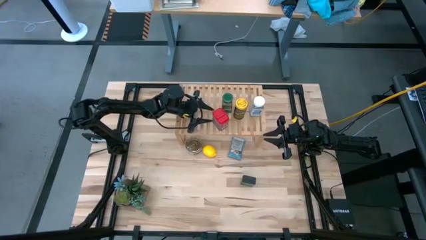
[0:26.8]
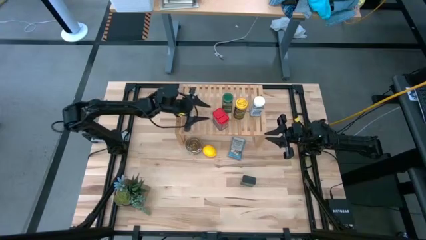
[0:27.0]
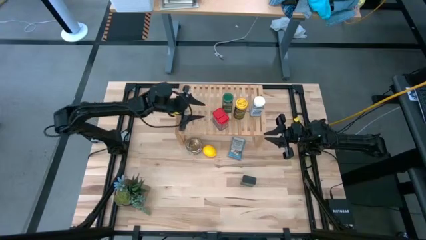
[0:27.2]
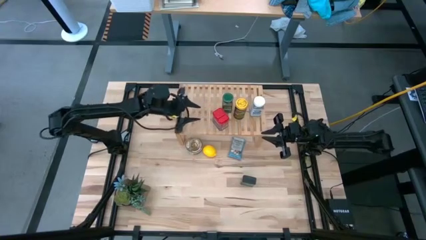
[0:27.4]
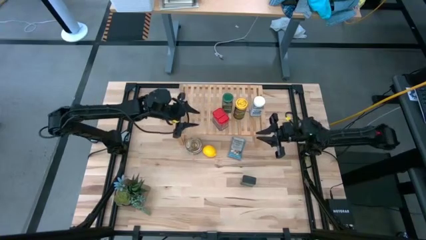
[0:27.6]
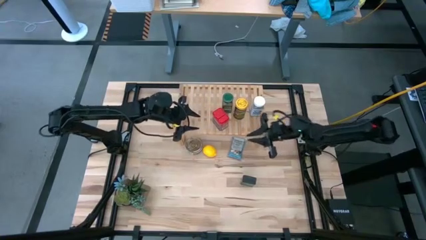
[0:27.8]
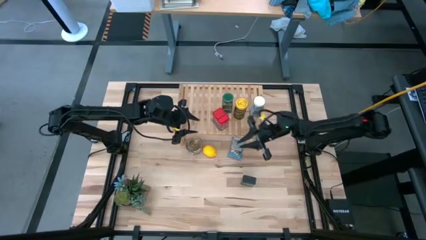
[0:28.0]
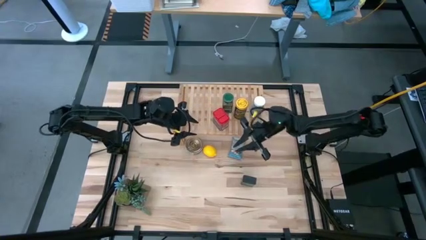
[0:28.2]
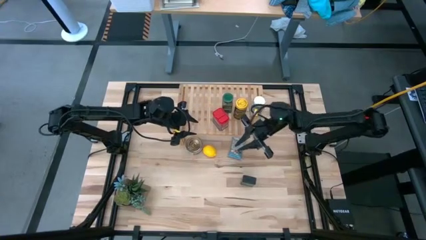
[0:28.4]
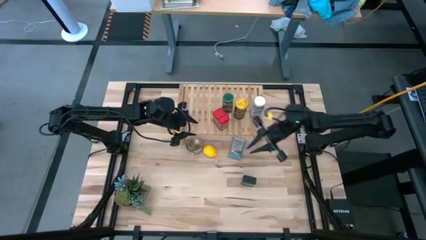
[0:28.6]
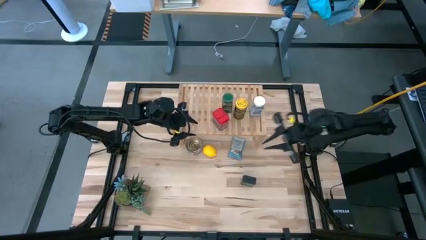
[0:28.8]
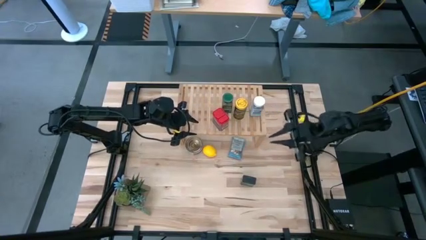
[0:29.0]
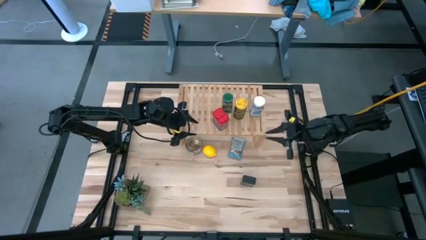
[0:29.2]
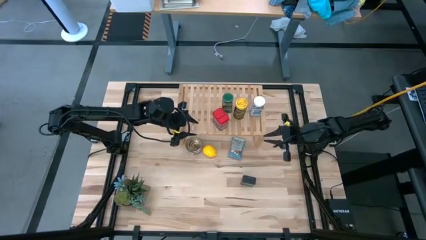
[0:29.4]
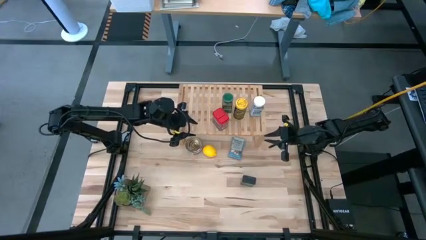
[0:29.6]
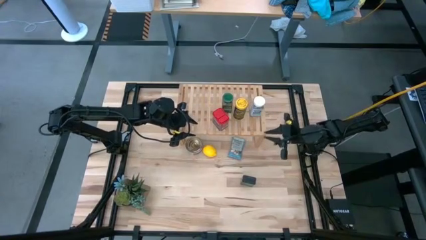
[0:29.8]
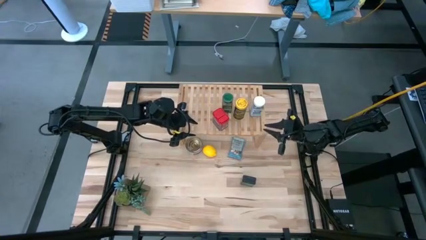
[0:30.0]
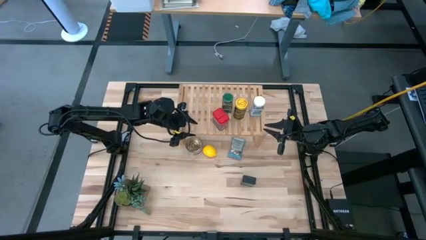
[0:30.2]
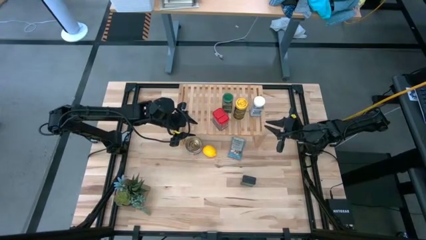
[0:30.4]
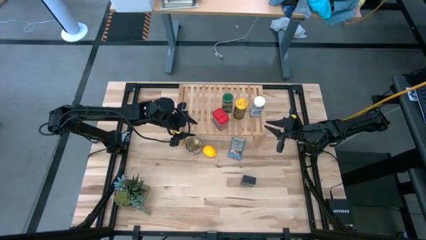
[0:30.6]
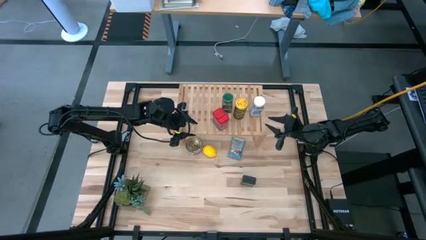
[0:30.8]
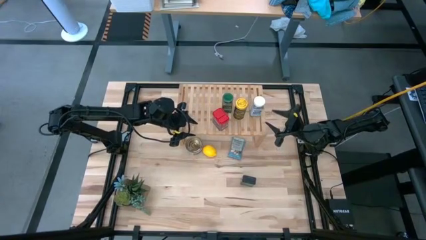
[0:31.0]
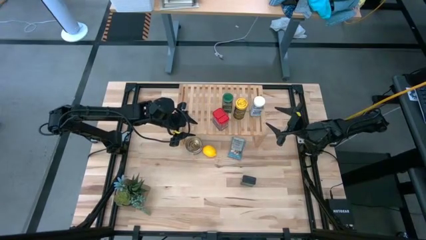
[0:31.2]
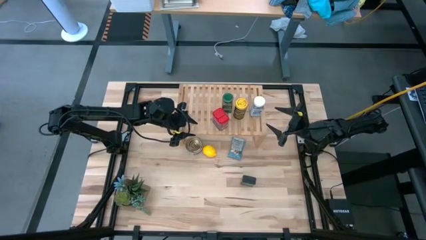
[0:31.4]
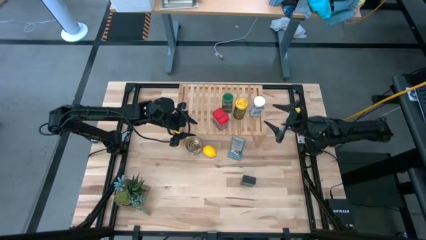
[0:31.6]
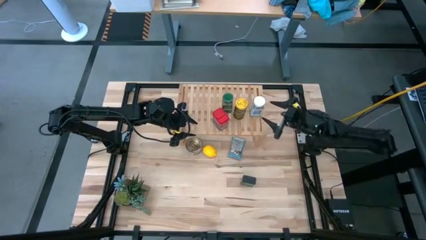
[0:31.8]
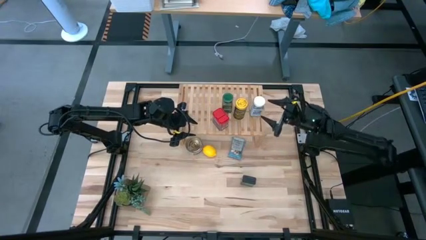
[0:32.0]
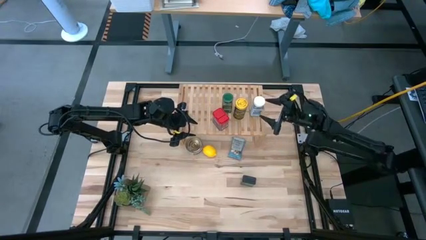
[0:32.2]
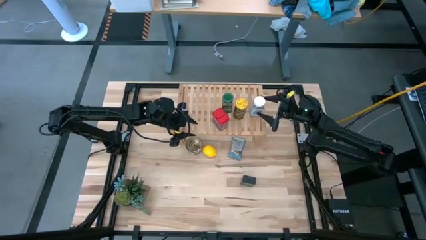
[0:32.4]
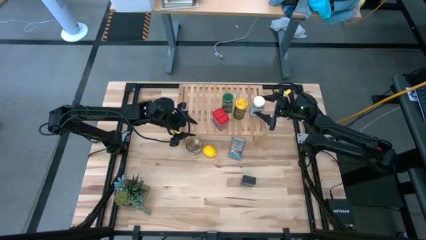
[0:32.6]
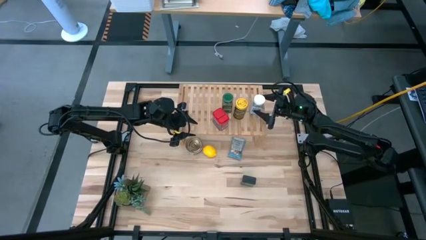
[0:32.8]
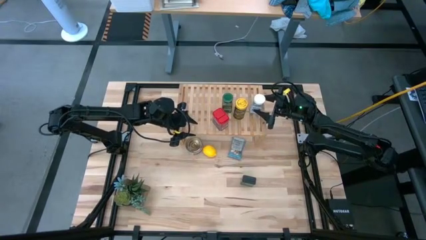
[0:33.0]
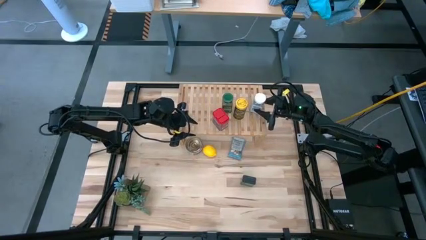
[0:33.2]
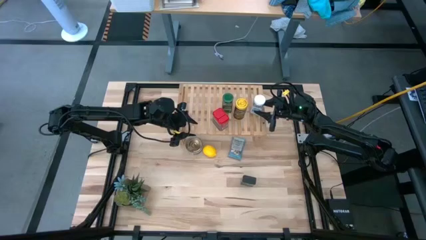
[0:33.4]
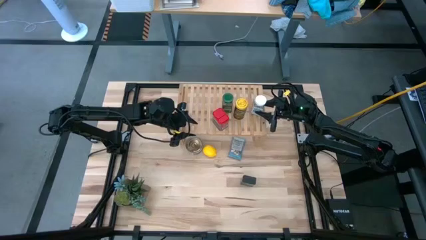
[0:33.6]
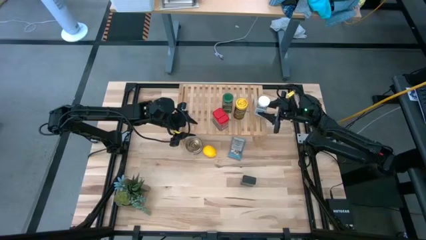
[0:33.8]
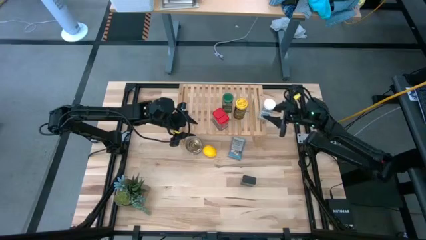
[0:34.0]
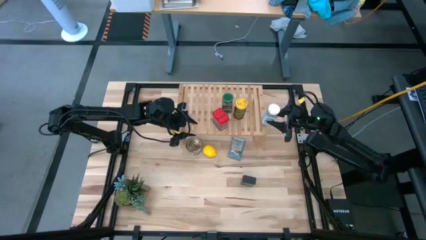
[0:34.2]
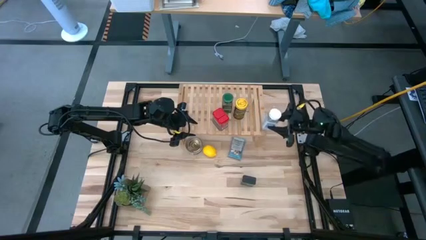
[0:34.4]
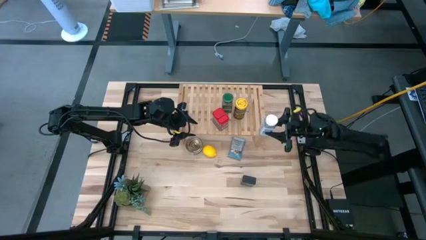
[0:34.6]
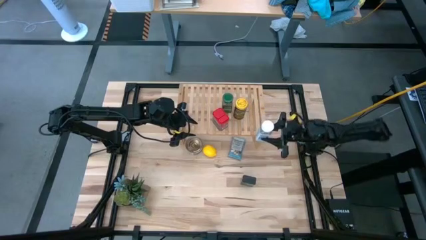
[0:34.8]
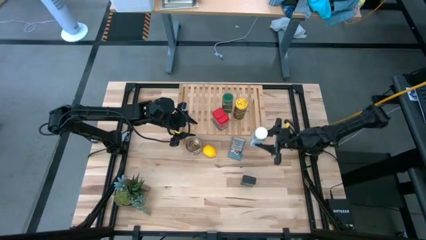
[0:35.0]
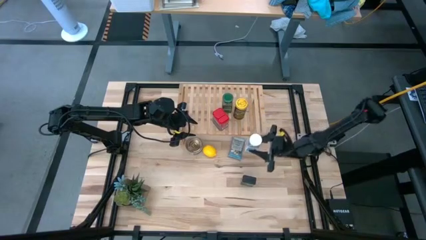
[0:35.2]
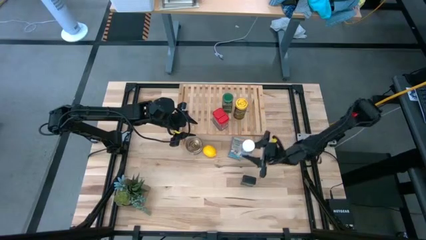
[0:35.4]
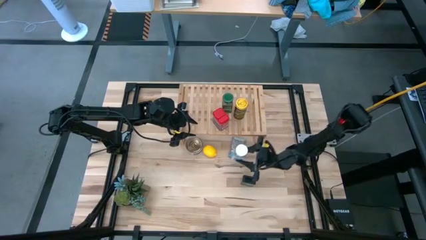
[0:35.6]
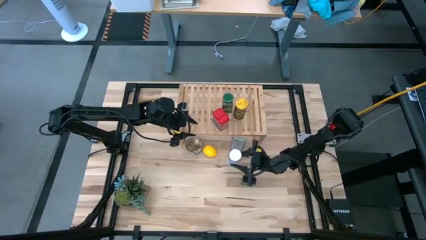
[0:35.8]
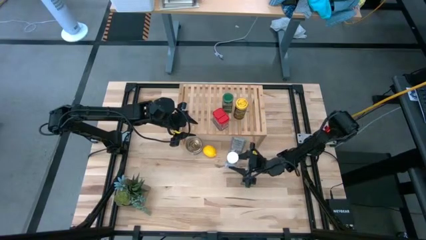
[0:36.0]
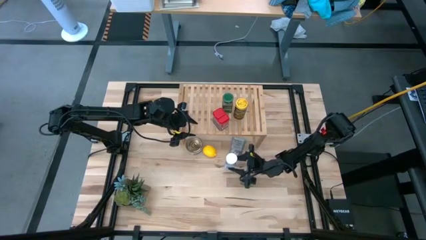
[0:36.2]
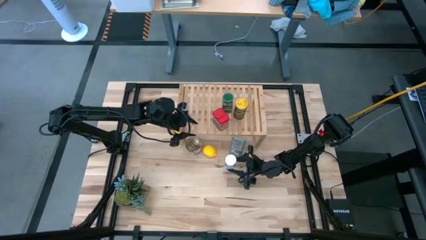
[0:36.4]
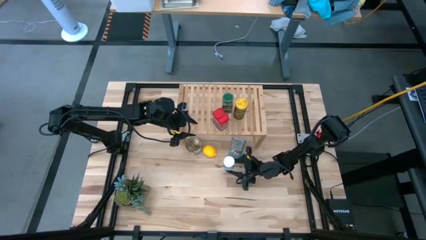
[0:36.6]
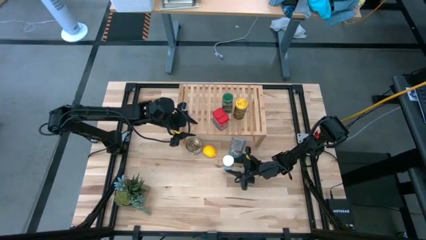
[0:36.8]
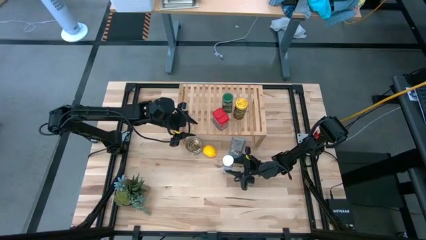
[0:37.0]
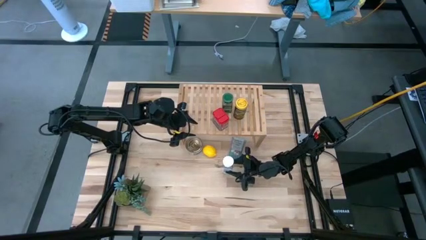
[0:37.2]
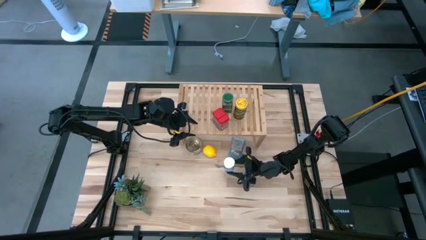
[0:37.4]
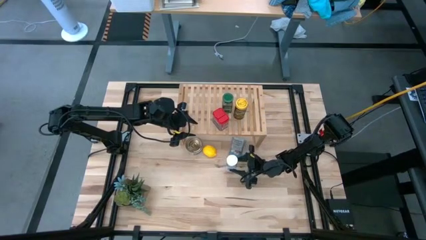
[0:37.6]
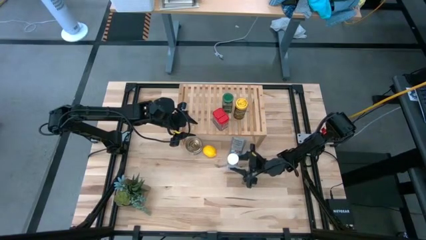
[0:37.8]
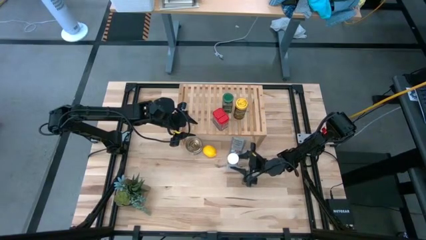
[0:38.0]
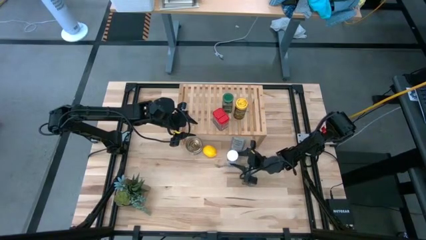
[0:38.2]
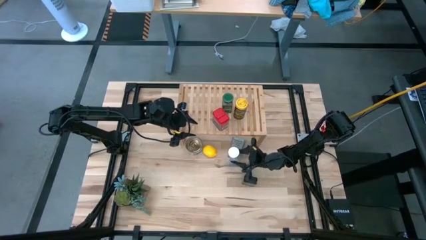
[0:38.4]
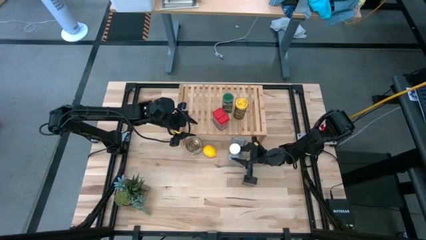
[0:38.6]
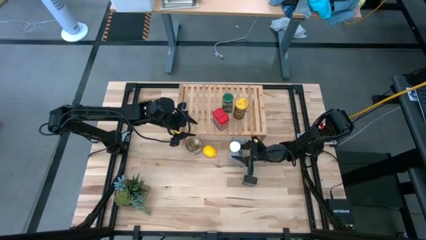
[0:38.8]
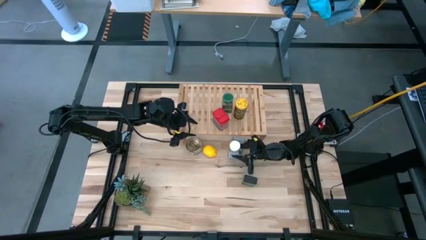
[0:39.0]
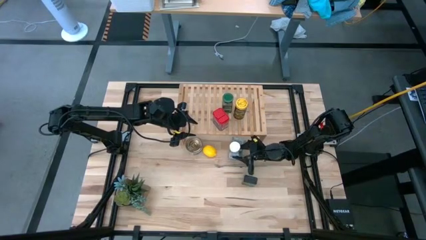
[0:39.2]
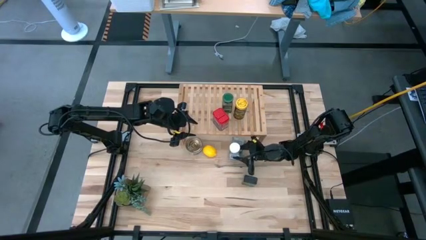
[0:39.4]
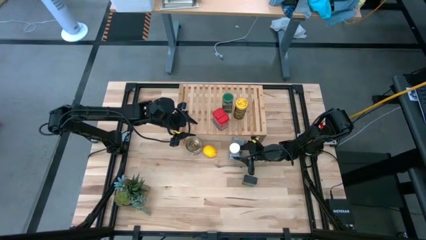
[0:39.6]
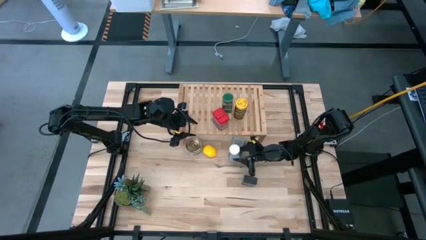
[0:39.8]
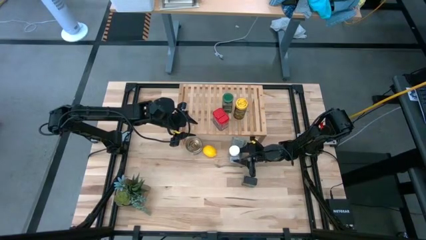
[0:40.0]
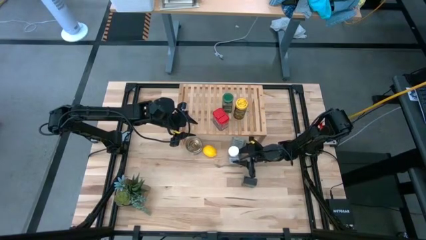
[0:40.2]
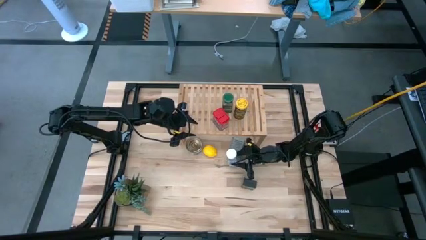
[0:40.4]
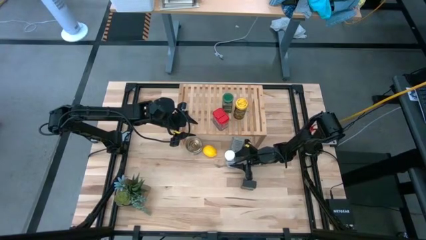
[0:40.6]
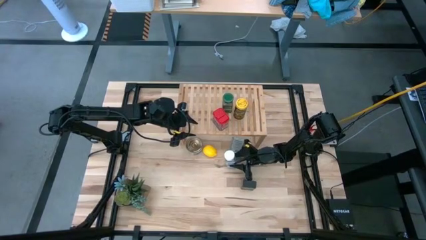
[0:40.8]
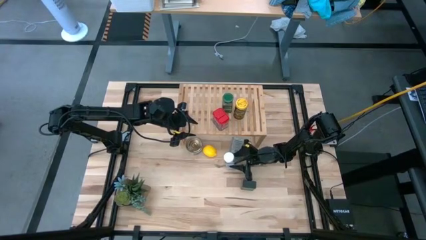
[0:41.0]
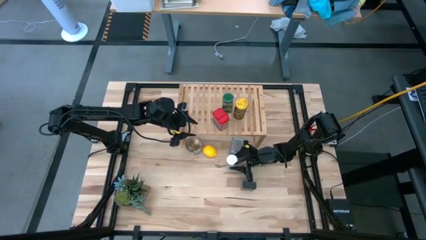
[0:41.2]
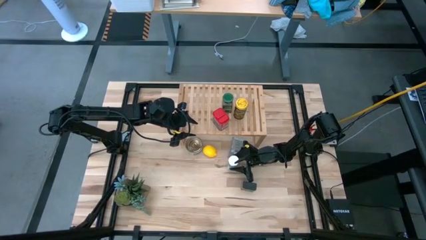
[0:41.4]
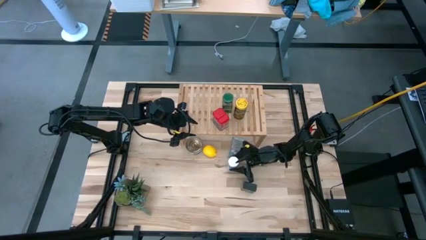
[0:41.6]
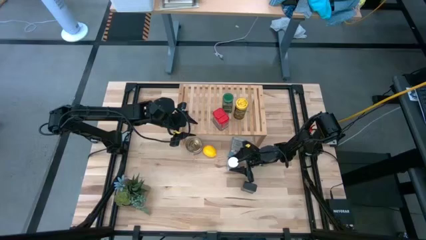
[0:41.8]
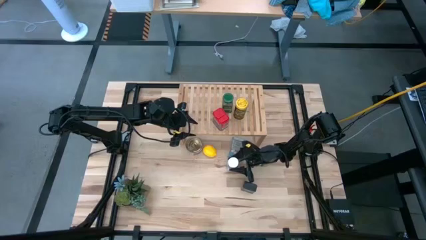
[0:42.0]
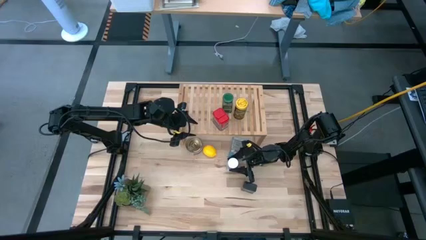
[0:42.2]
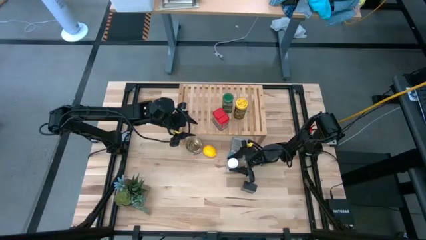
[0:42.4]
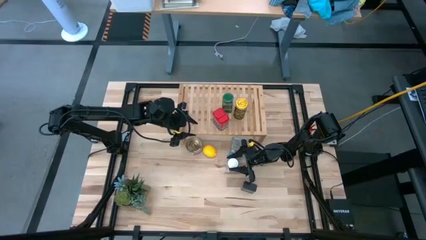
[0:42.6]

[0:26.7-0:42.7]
Task: Shelf spices
Remove the white seasoning bottle from the shelf
